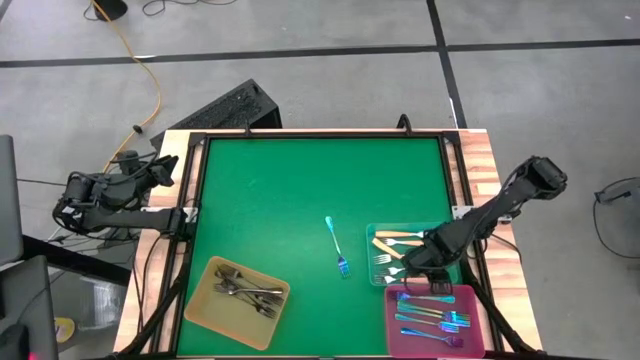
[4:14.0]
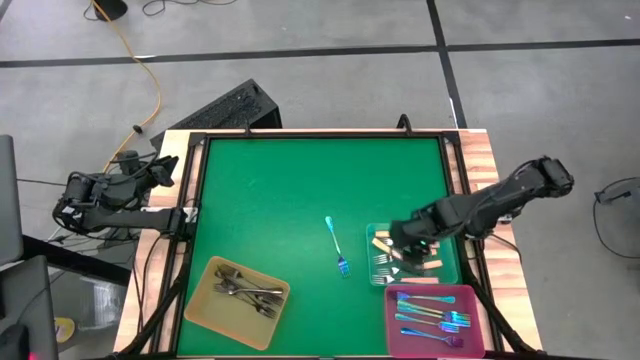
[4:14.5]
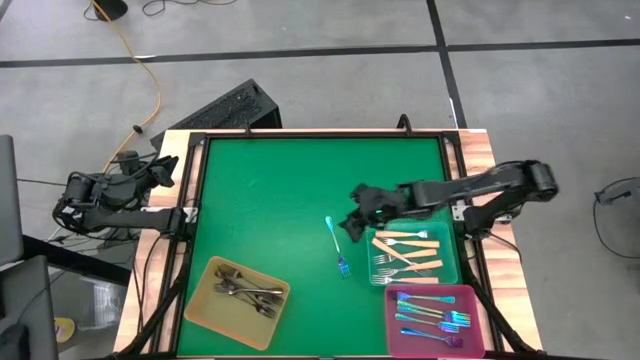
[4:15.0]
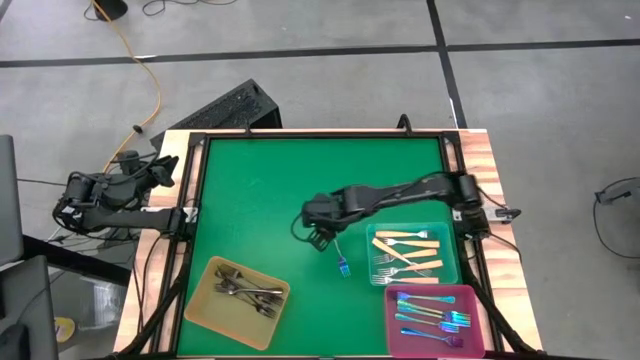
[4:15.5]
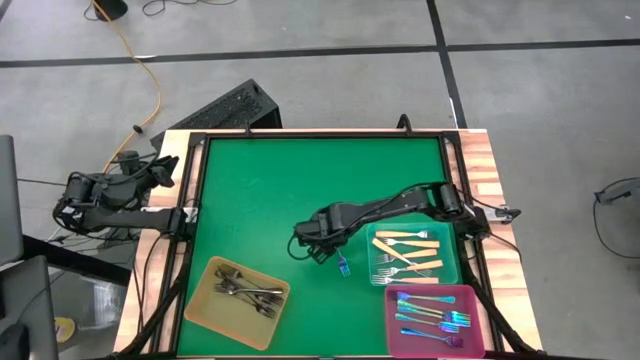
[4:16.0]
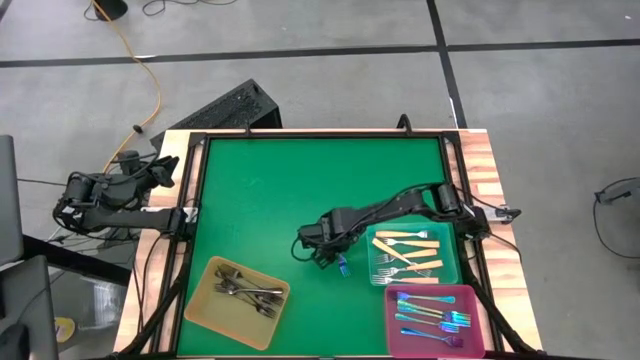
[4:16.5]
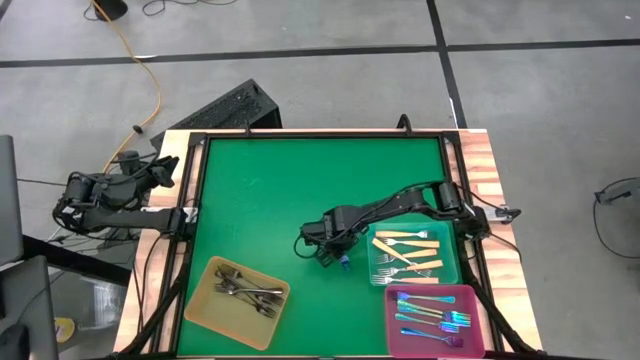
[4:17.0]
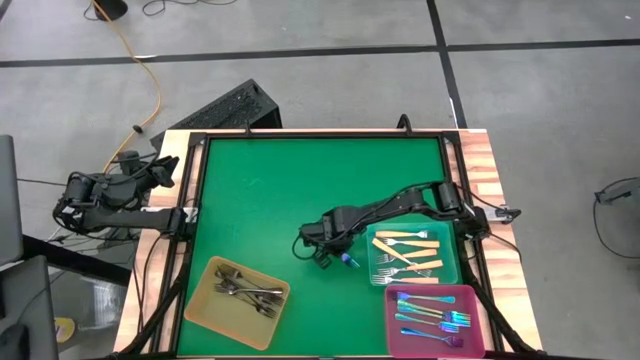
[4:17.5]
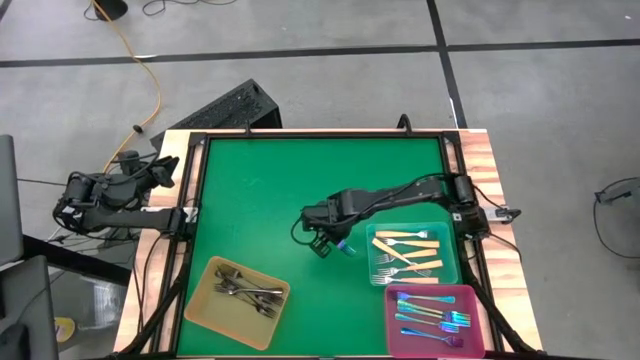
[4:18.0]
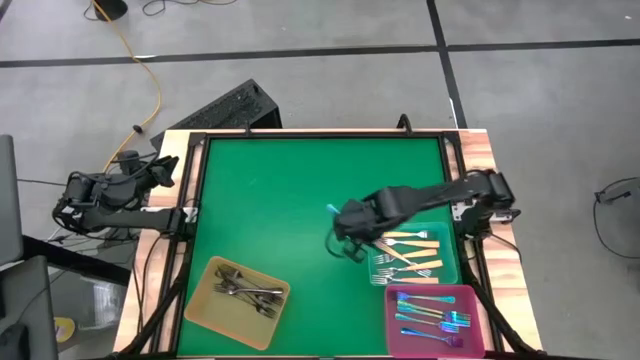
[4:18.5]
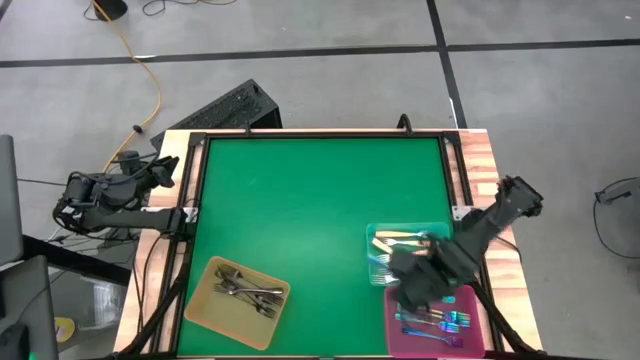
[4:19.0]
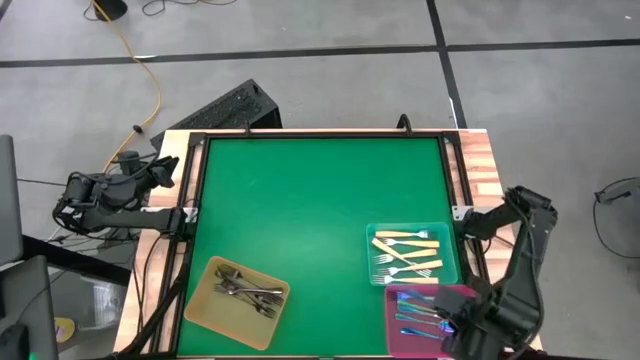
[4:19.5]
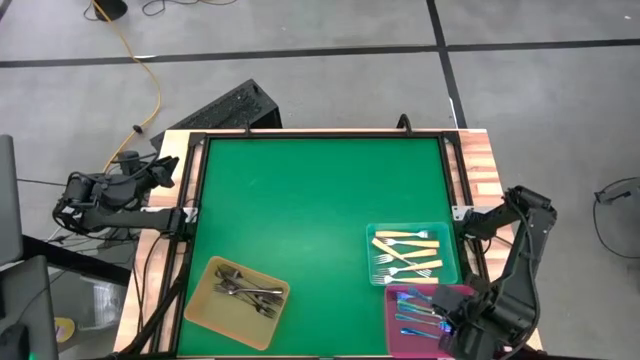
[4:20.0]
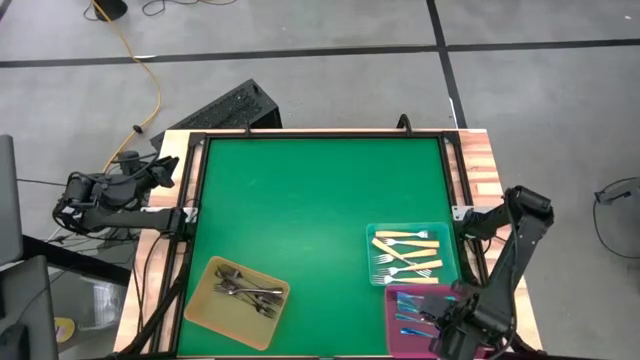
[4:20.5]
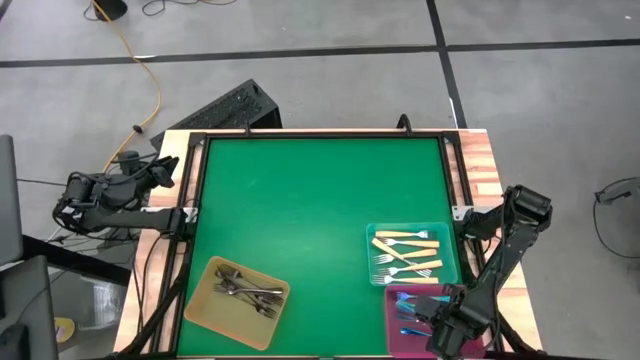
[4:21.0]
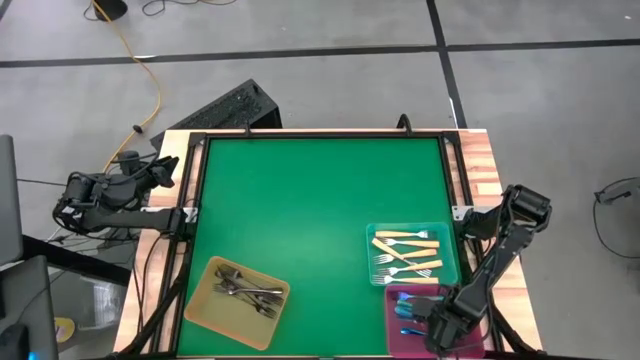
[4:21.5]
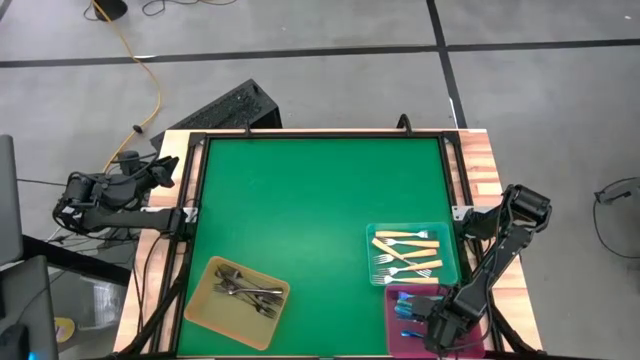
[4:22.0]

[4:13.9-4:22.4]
Task: Sort silverware by color (type)
Put the purple fork into the pink bin

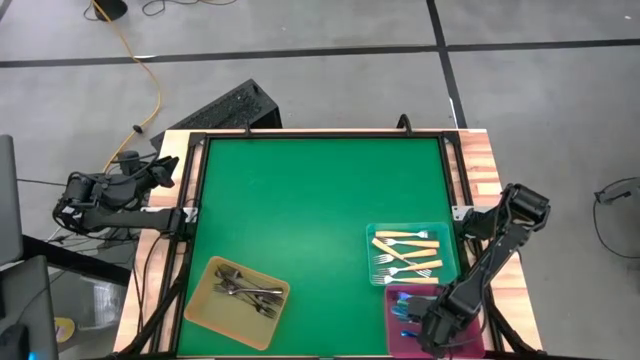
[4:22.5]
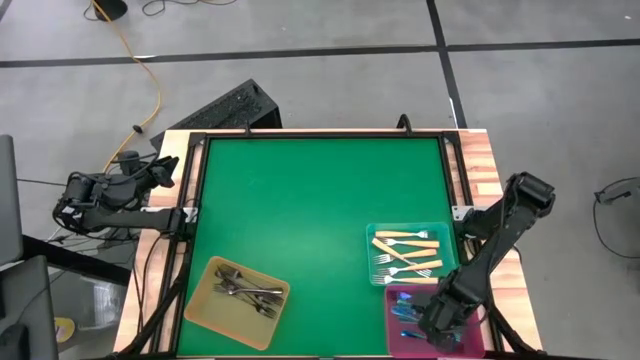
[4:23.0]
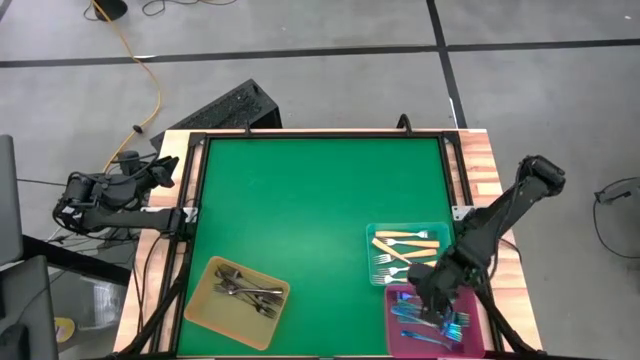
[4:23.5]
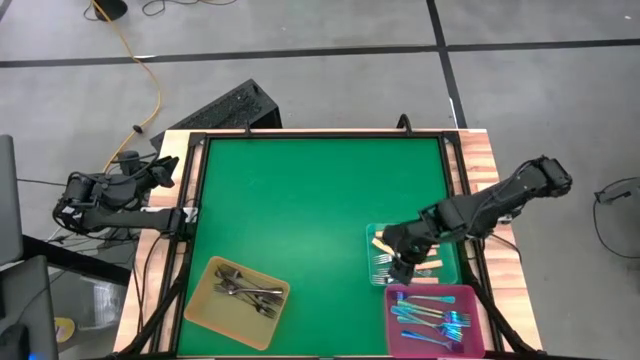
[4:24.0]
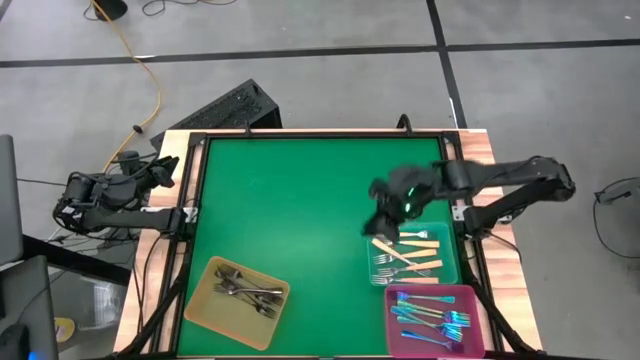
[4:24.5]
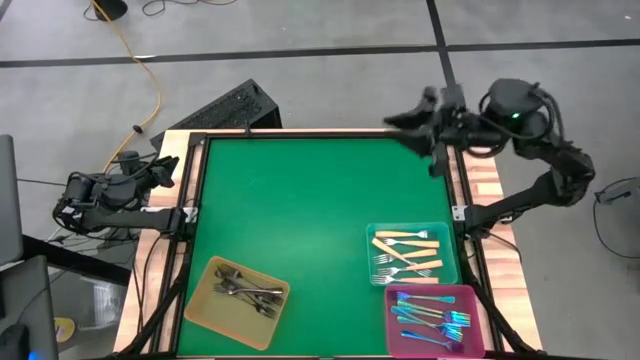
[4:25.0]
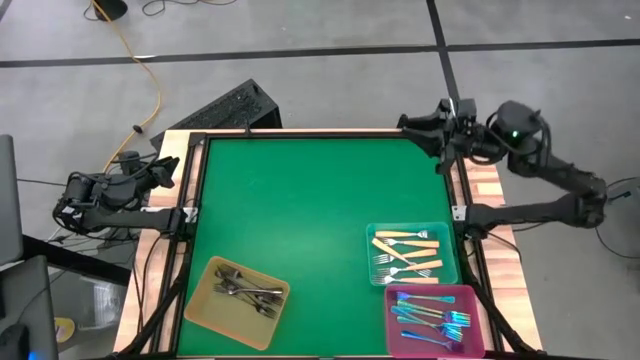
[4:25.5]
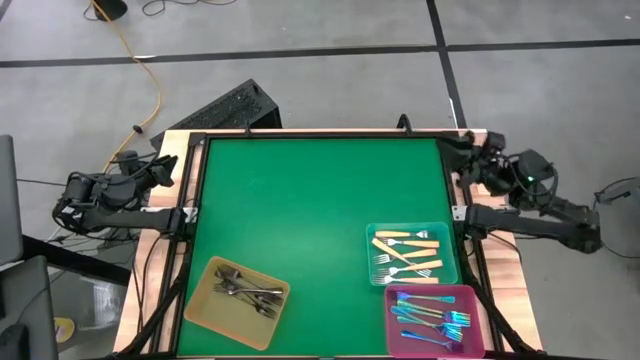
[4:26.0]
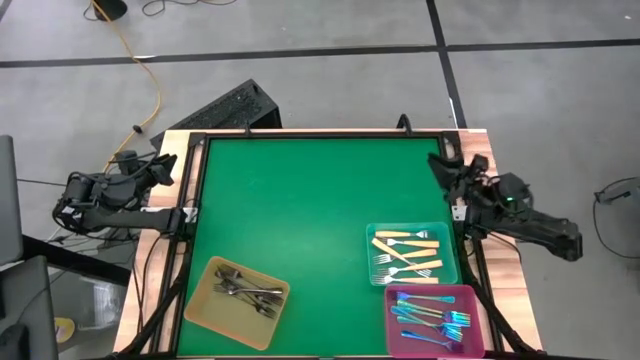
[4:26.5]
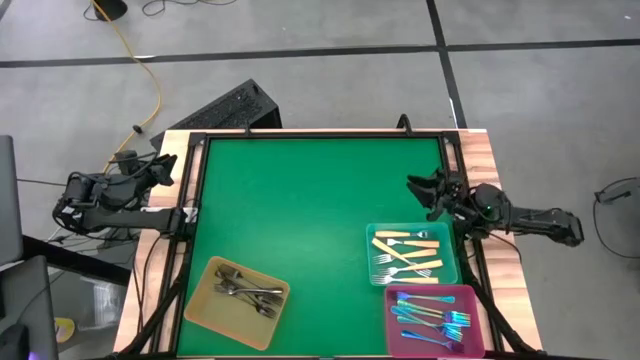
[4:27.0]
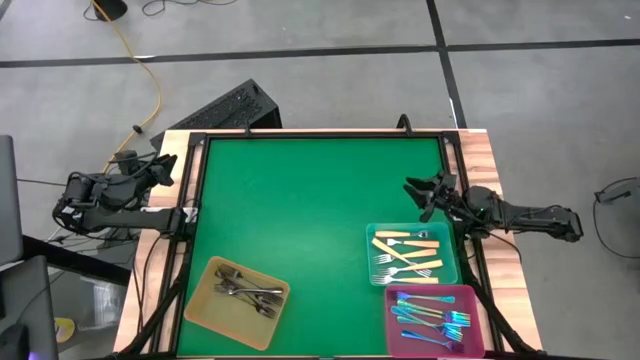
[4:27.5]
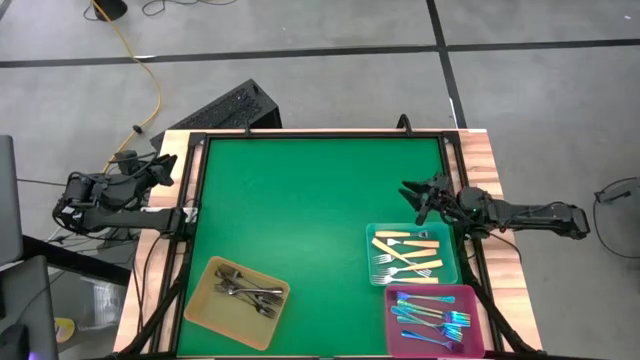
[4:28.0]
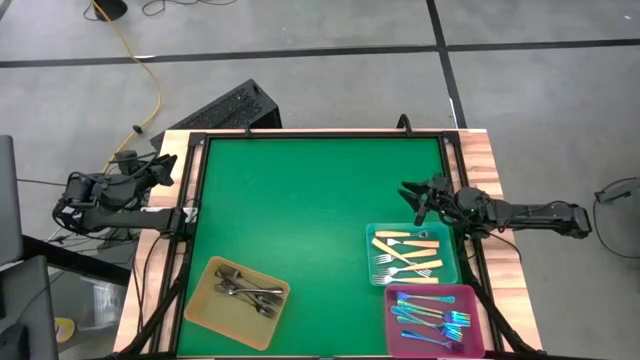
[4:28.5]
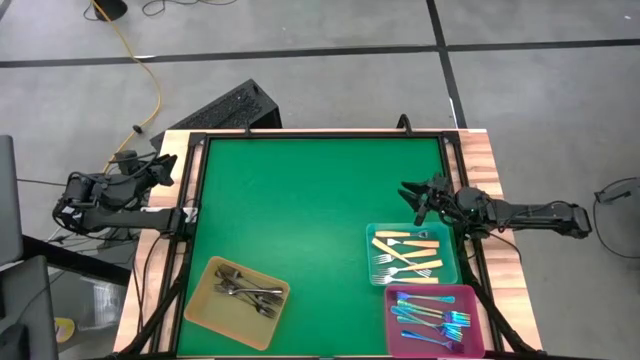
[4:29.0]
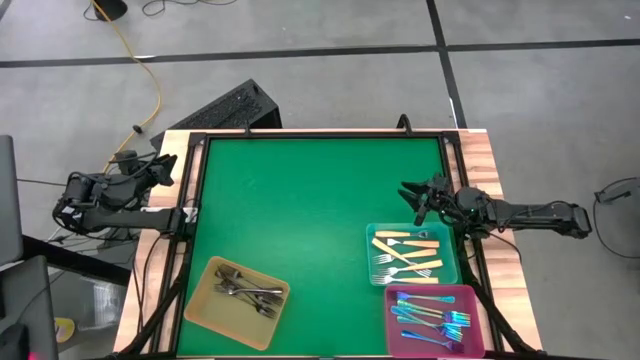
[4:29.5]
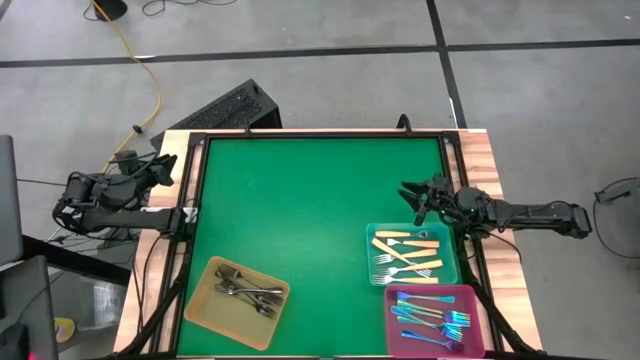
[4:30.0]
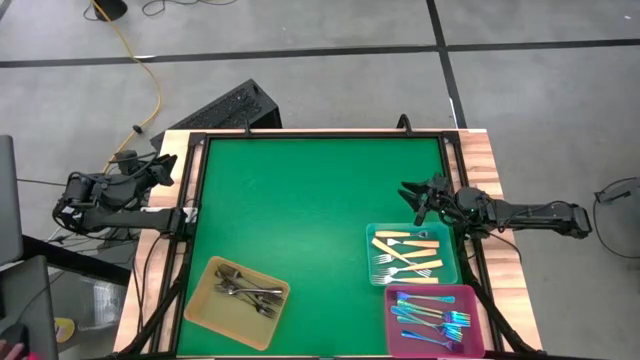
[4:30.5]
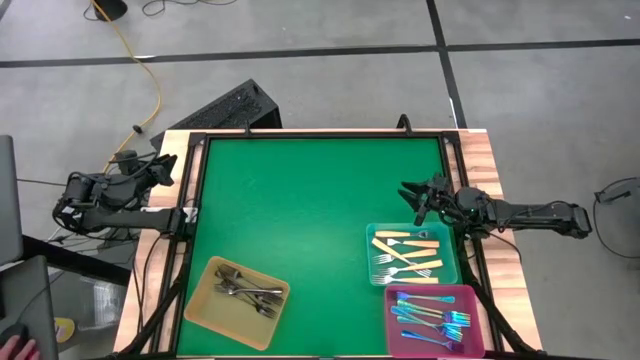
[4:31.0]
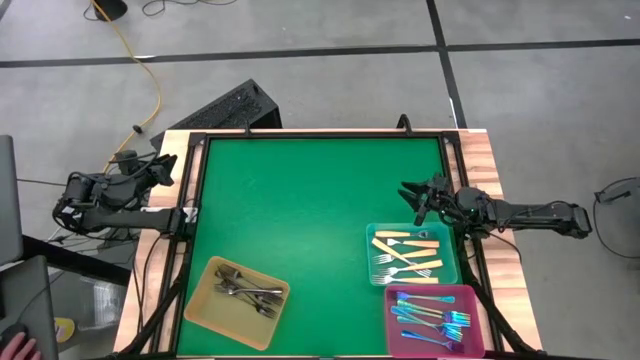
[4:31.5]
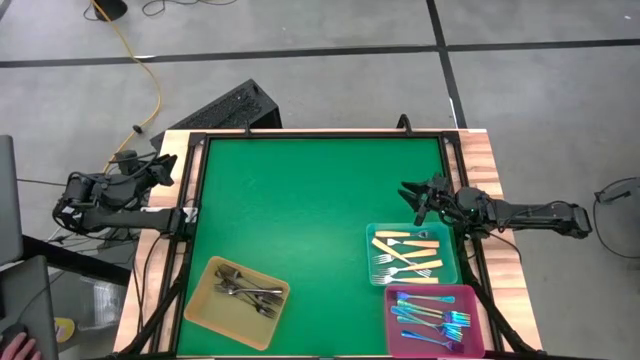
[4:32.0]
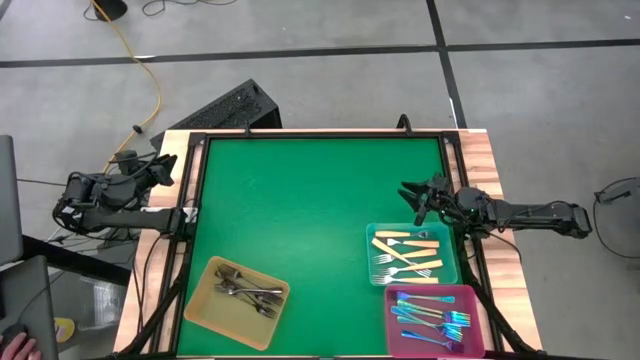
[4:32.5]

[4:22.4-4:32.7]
Return to Home Position

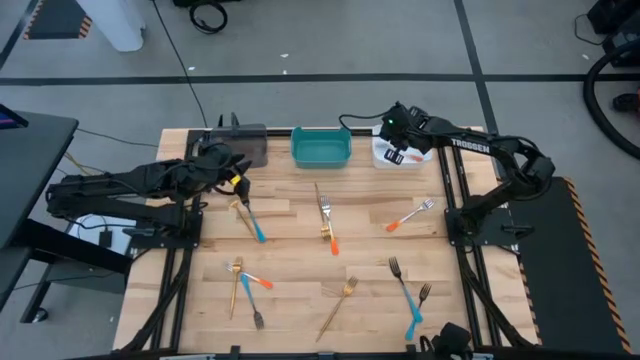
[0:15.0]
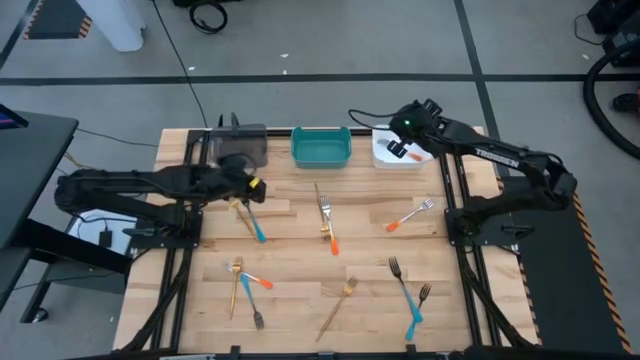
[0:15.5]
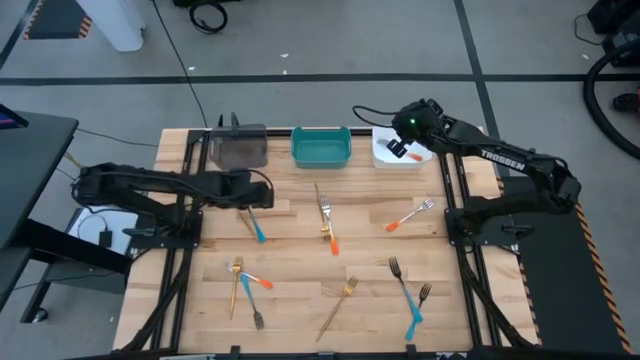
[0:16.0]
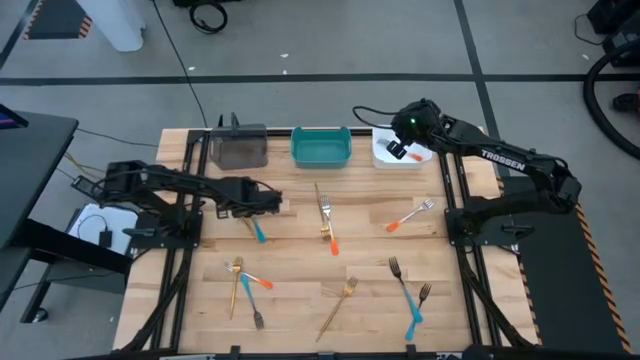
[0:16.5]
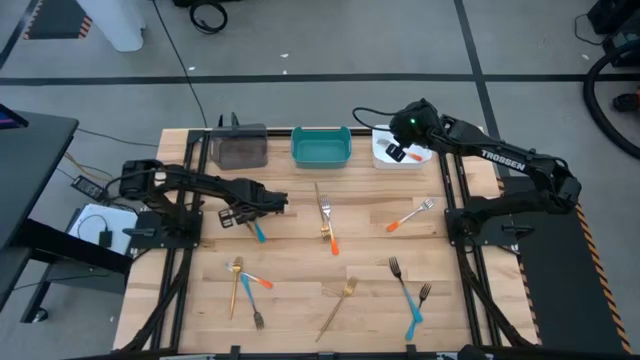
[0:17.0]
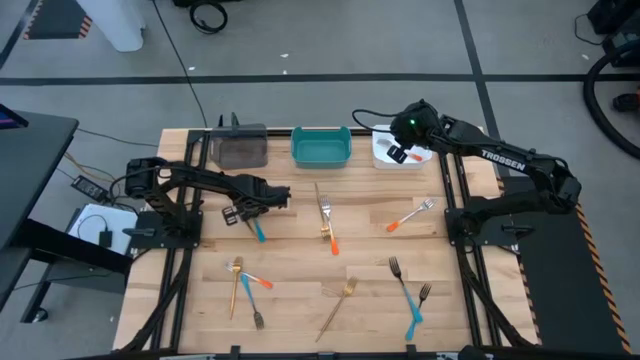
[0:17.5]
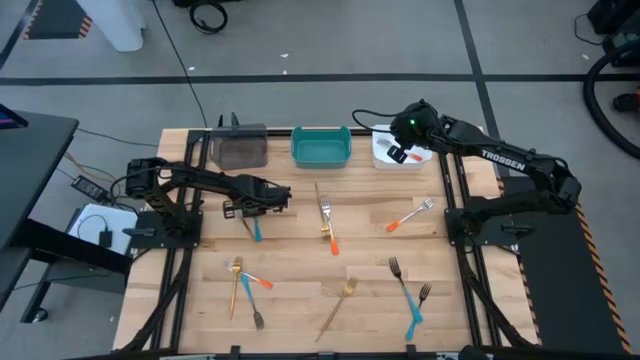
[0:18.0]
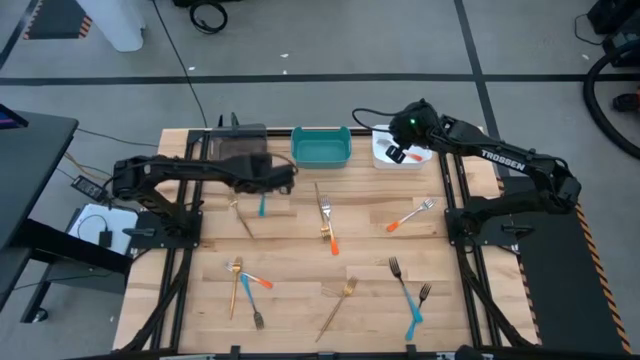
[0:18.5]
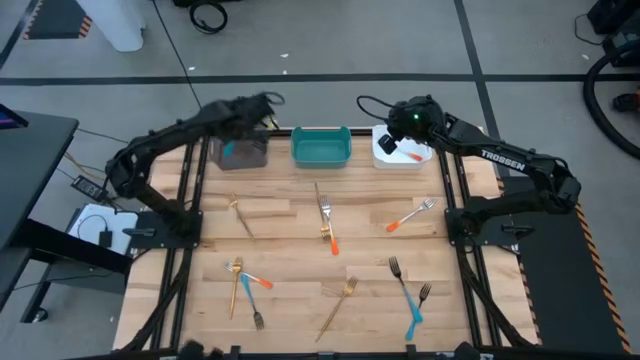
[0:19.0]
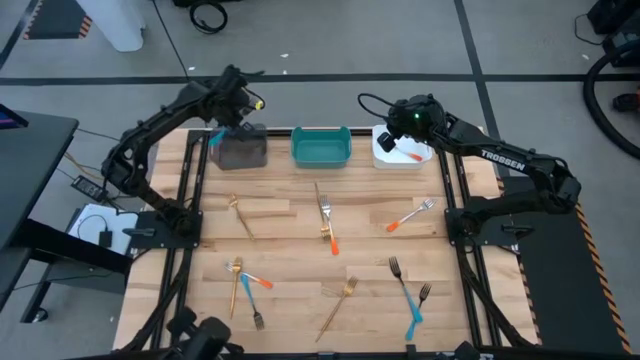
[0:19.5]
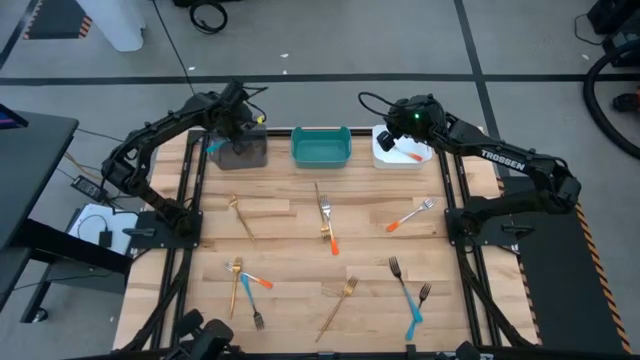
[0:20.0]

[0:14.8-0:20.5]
Task: Sort silverware by color (type)
Put the blue fork into the black bin
